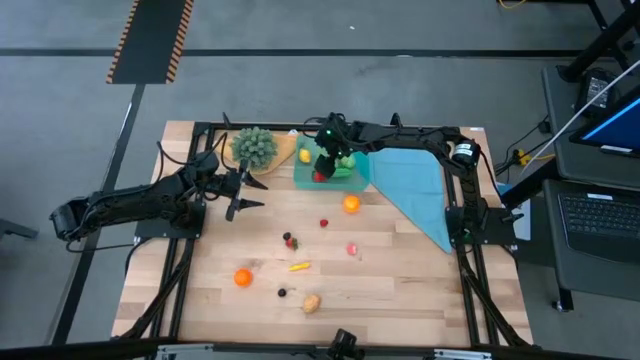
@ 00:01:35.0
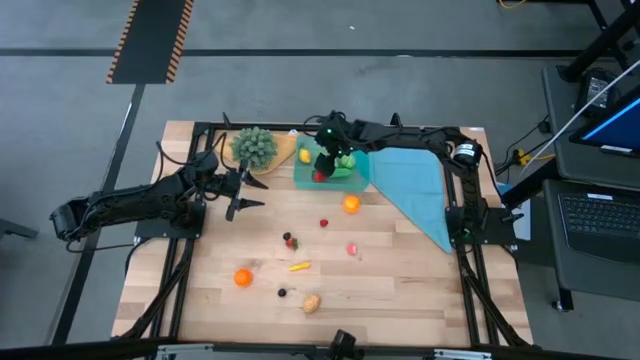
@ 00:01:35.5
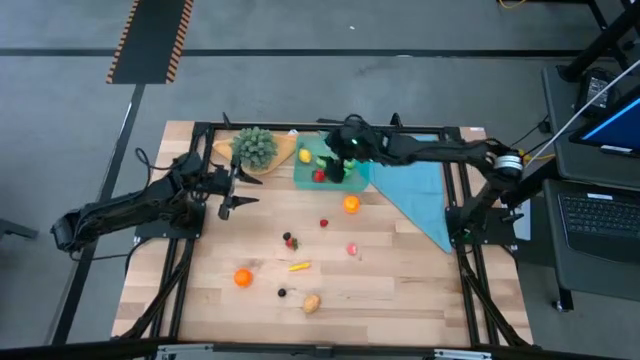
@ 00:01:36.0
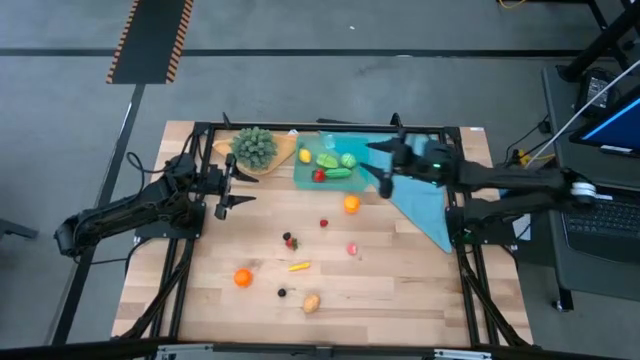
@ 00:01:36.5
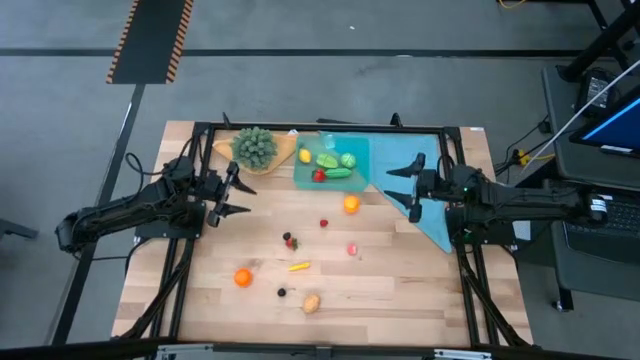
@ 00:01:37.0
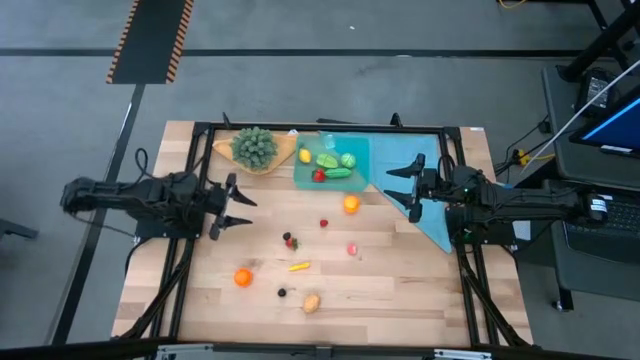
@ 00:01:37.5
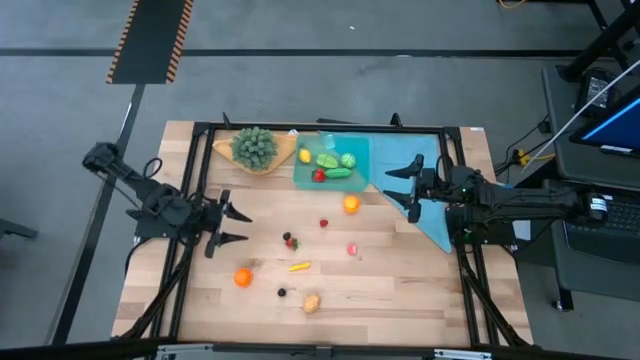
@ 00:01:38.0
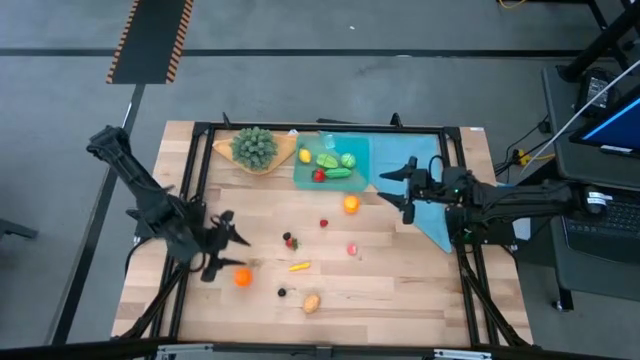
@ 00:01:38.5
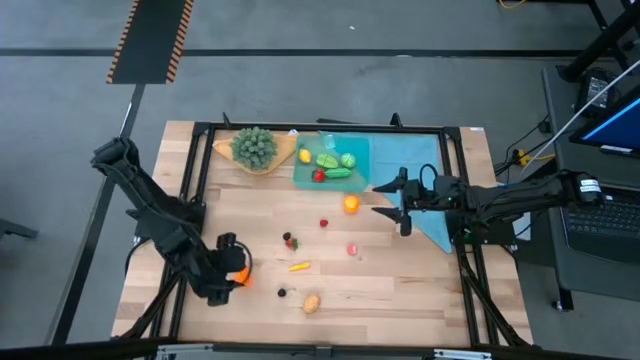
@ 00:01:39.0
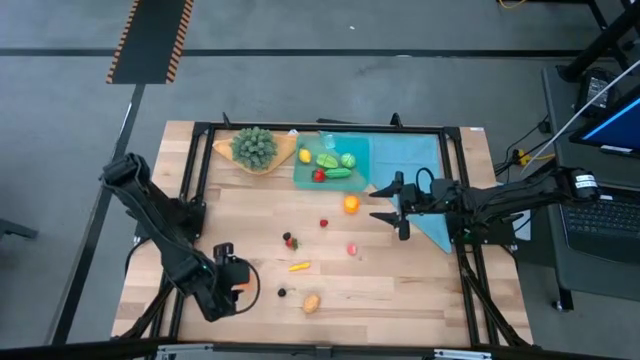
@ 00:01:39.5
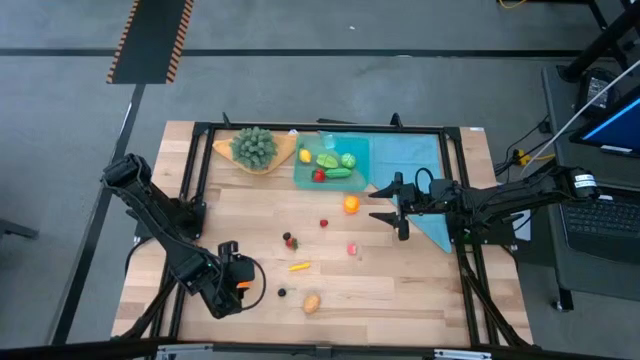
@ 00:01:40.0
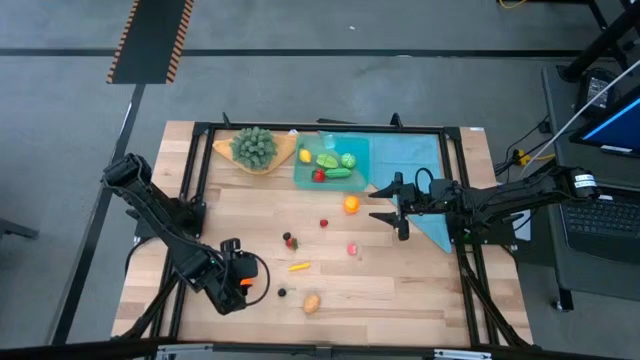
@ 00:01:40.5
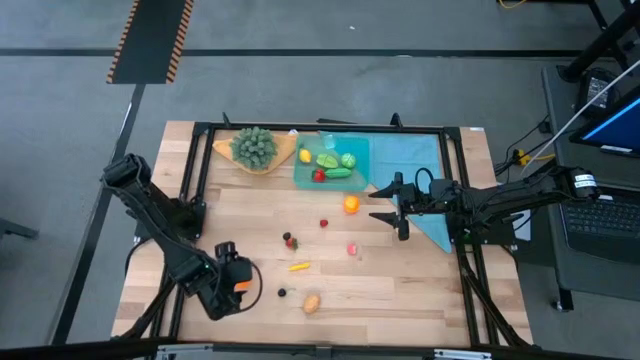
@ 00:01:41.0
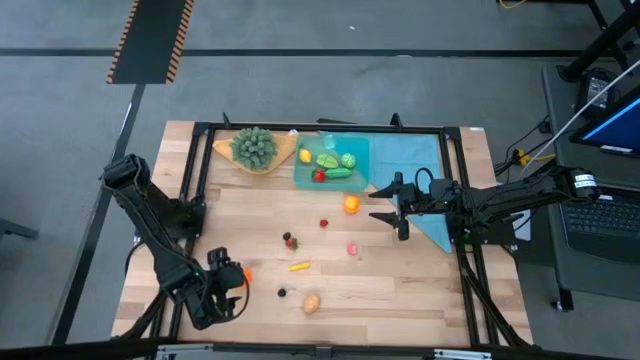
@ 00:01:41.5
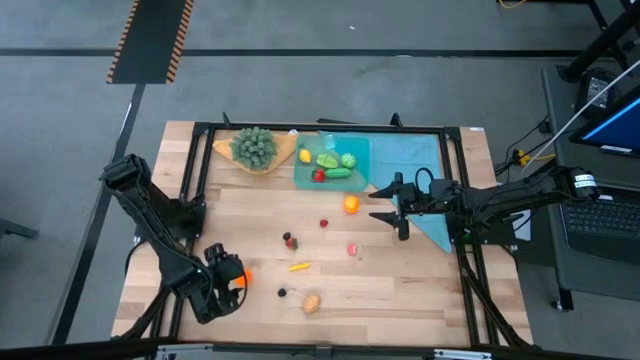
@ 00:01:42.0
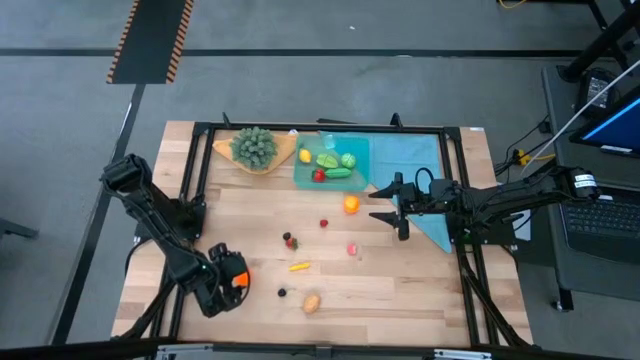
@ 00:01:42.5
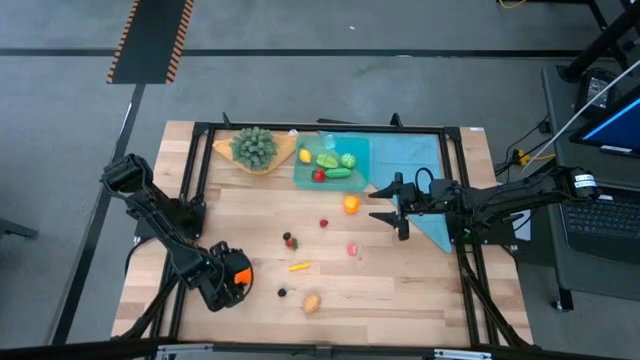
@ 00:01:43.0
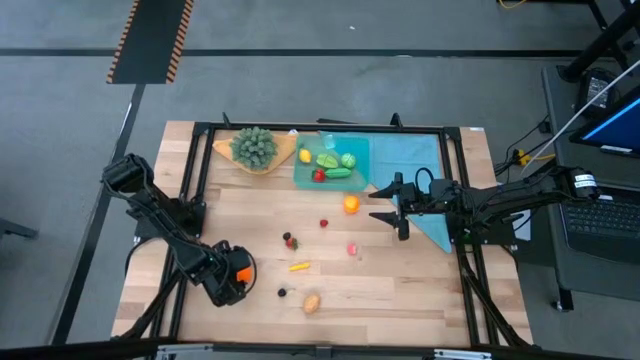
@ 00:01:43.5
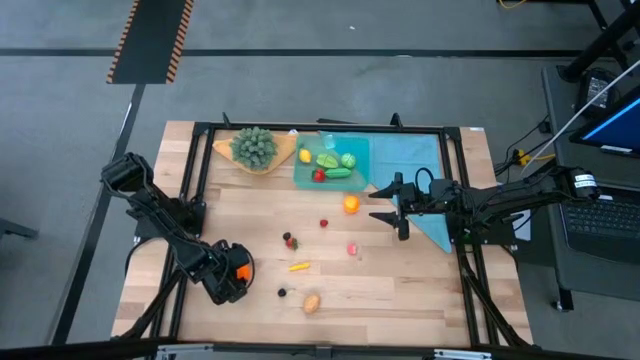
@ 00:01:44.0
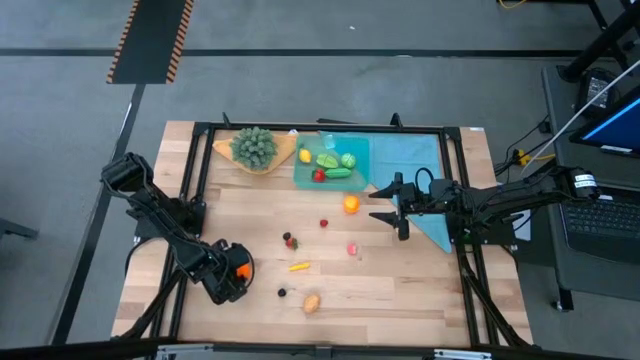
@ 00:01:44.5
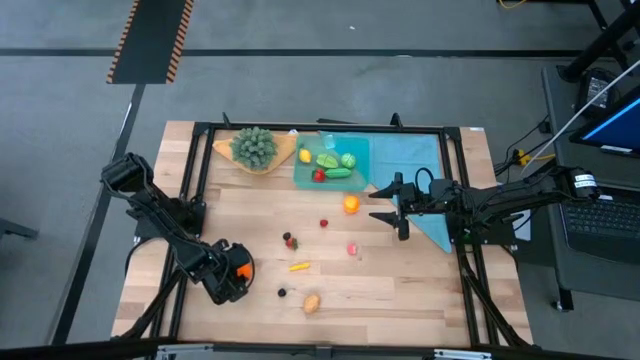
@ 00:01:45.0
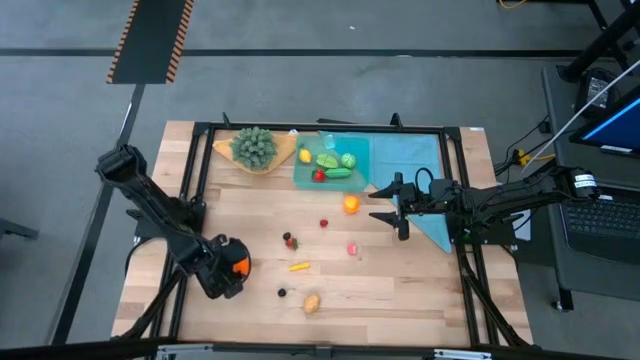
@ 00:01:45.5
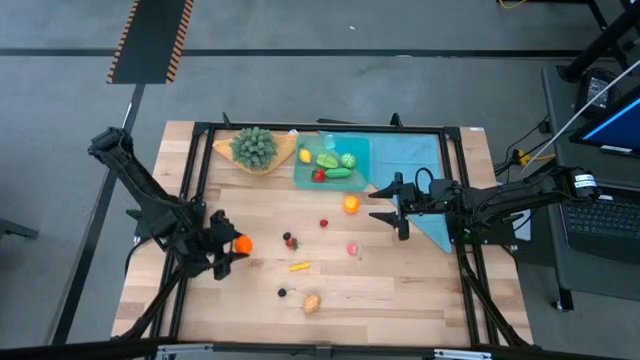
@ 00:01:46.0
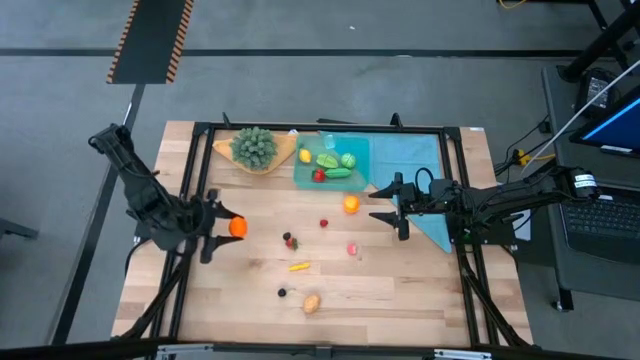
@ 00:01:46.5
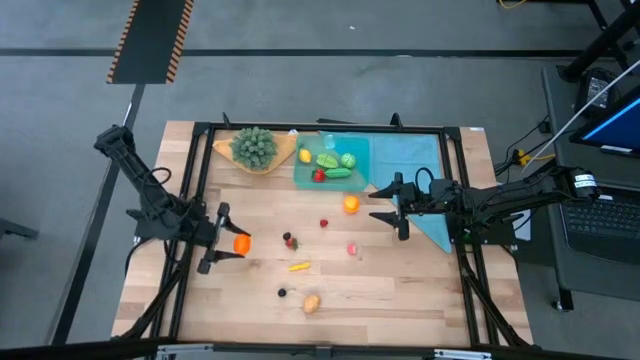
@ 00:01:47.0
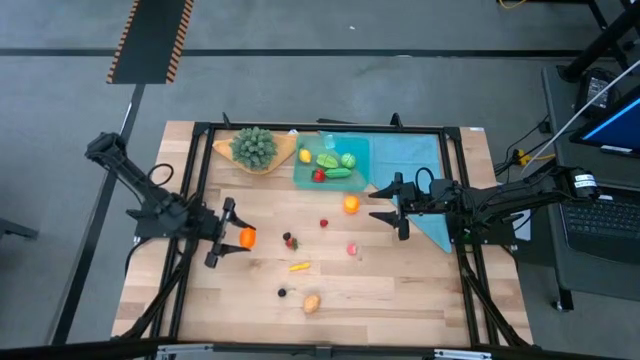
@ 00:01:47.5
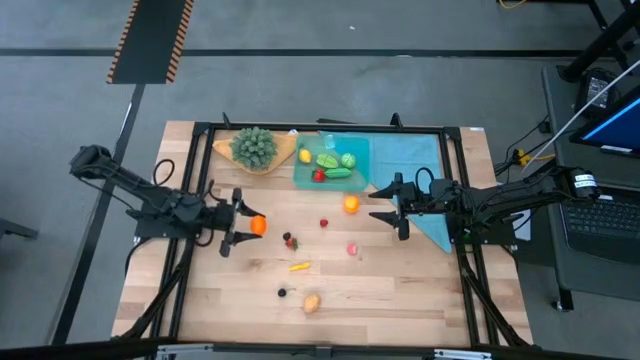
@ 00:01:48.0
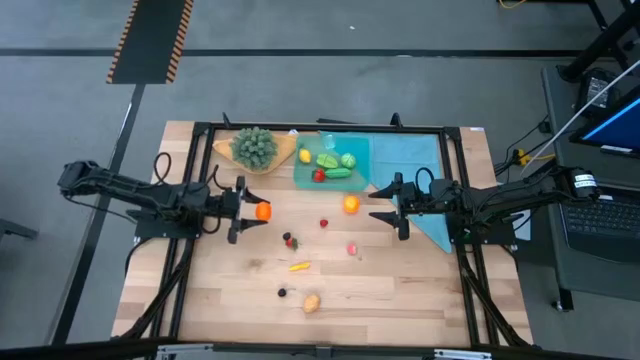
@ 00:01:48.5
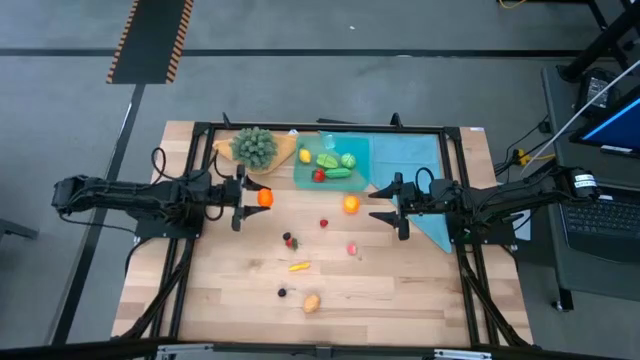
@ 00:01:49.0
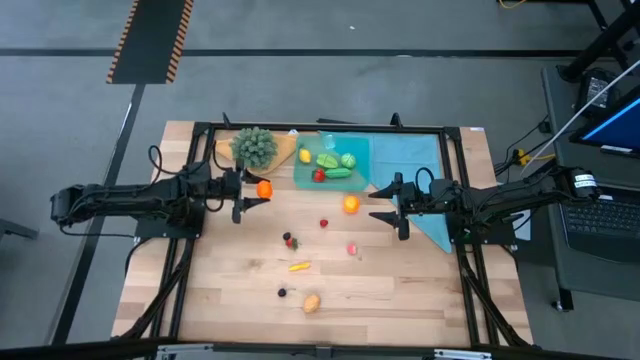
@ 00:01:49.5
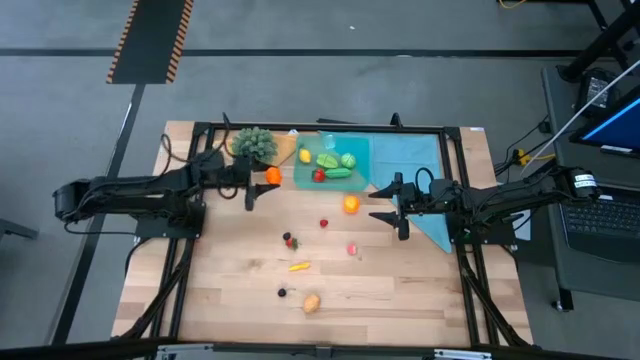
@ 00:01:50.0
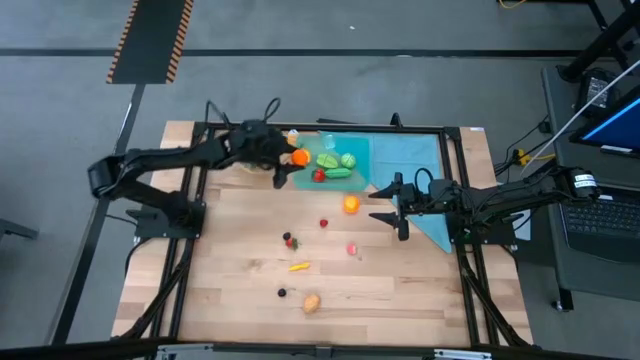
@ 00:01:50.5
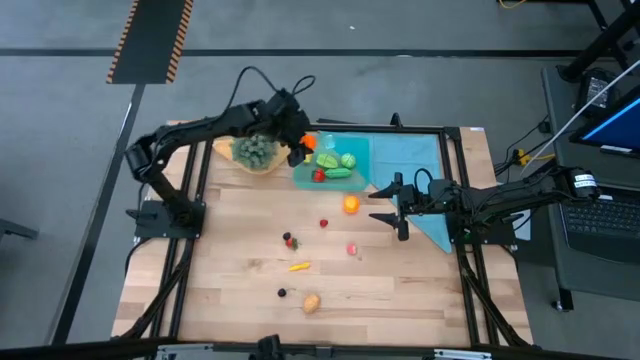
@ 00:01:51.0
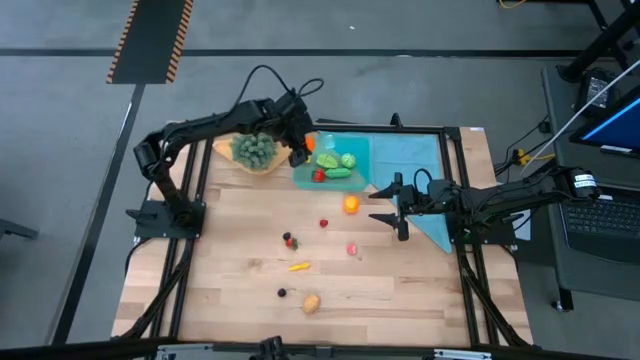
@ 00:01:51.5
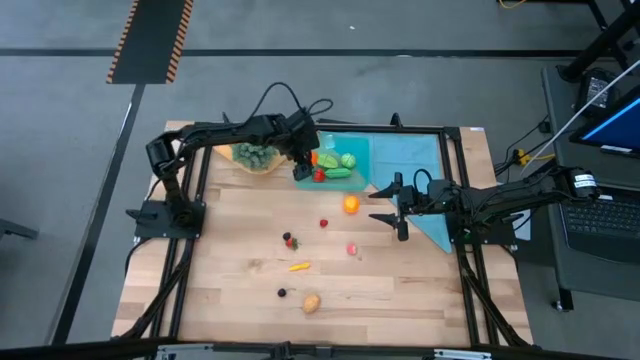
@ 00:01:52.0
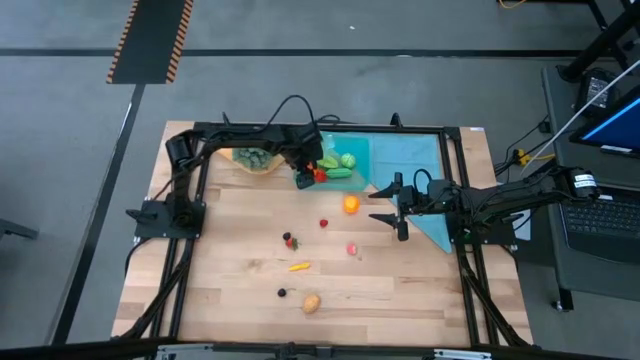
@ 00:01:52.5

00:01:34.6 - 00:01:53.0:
Task: Pick and placing Produce into tupperware
Put the pumpkin into the blue bin
